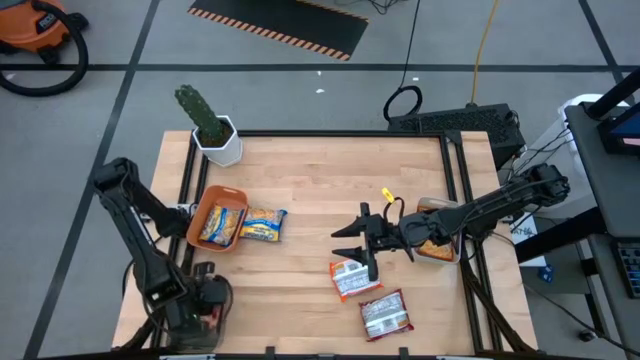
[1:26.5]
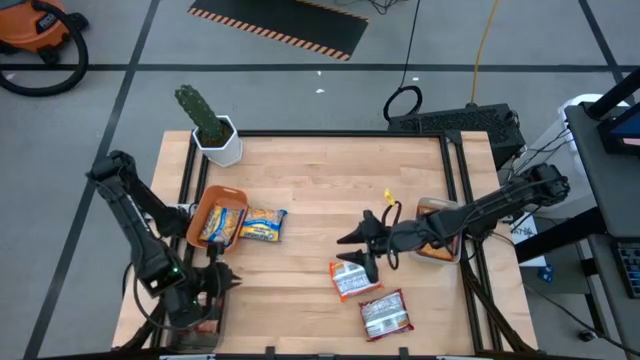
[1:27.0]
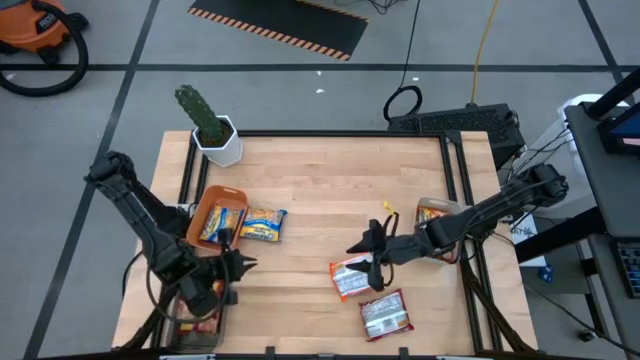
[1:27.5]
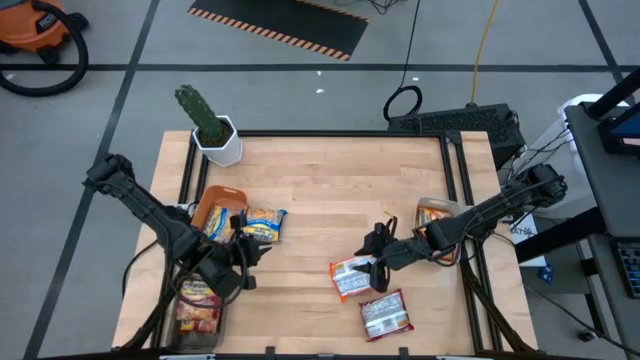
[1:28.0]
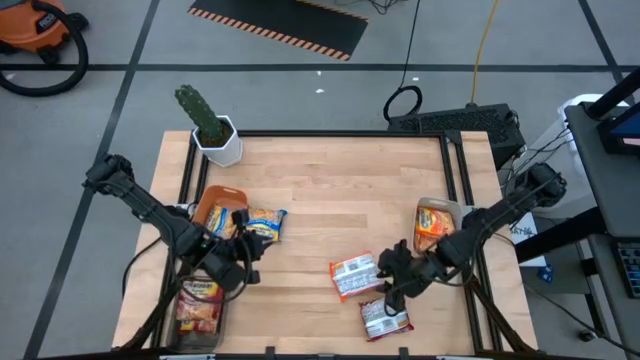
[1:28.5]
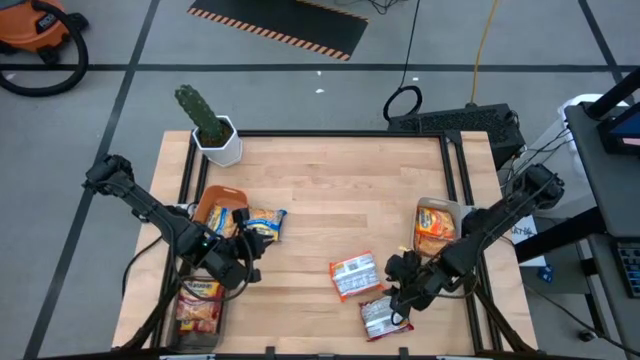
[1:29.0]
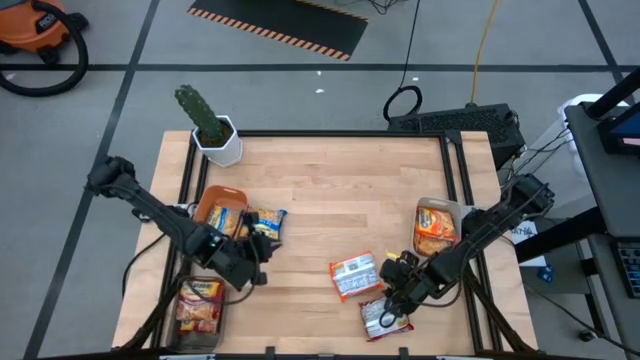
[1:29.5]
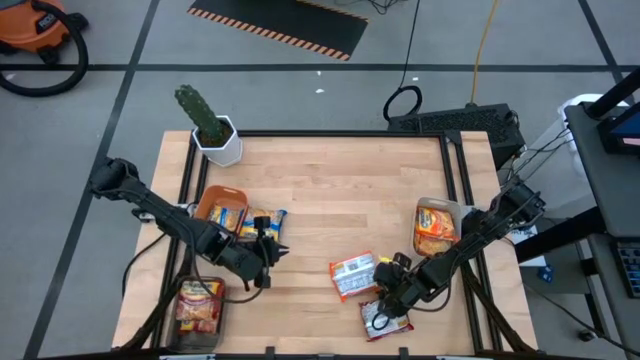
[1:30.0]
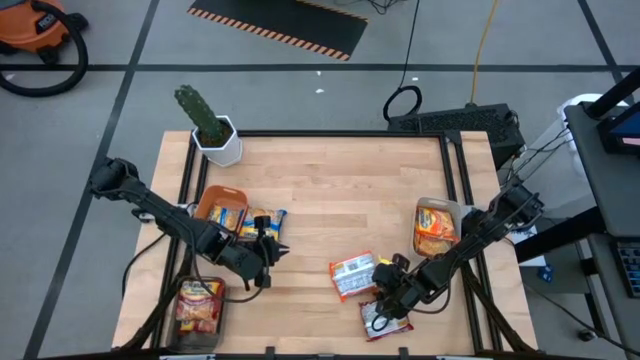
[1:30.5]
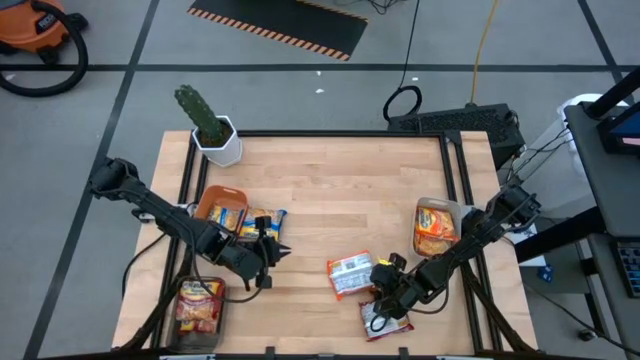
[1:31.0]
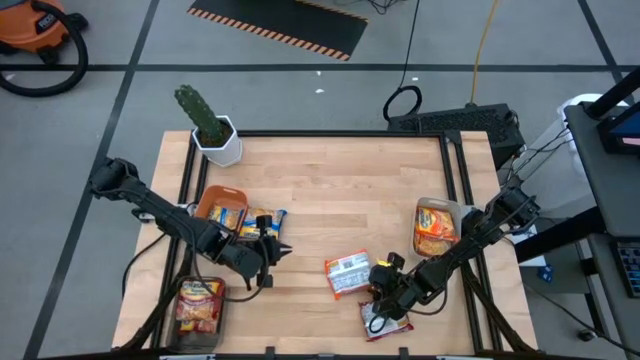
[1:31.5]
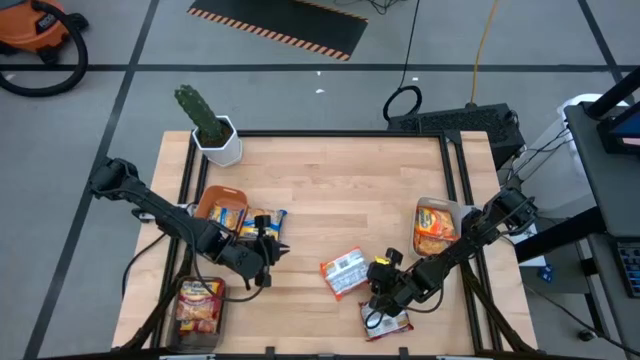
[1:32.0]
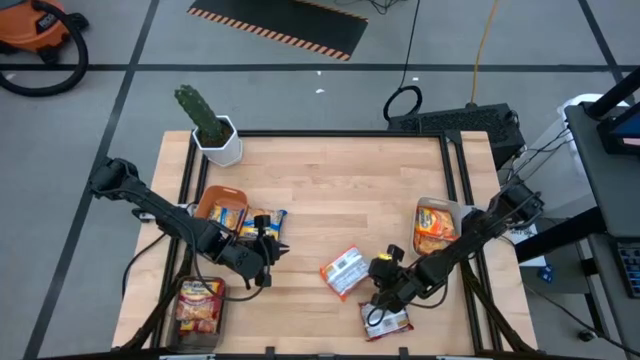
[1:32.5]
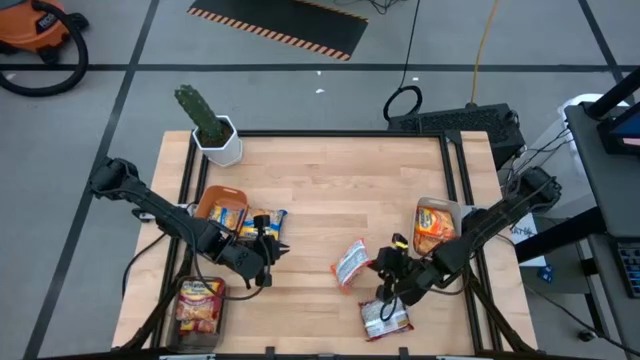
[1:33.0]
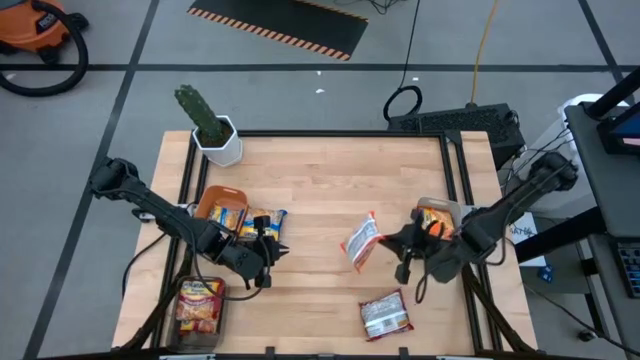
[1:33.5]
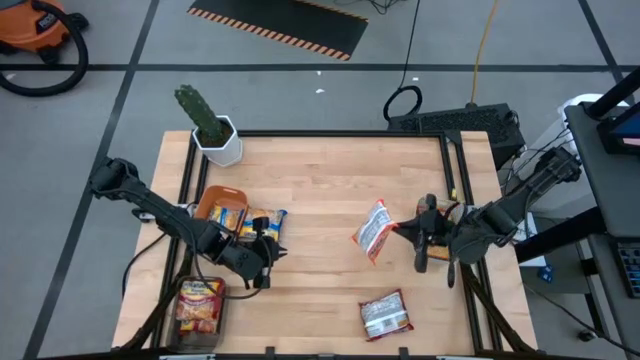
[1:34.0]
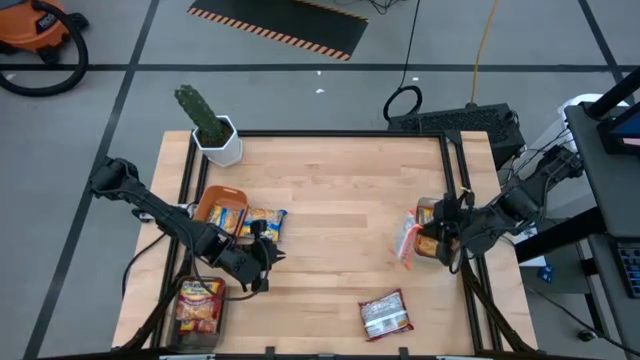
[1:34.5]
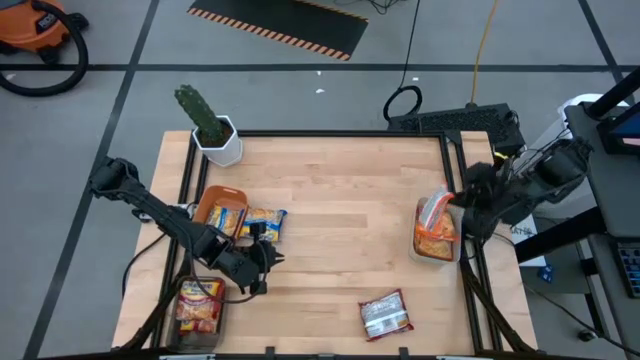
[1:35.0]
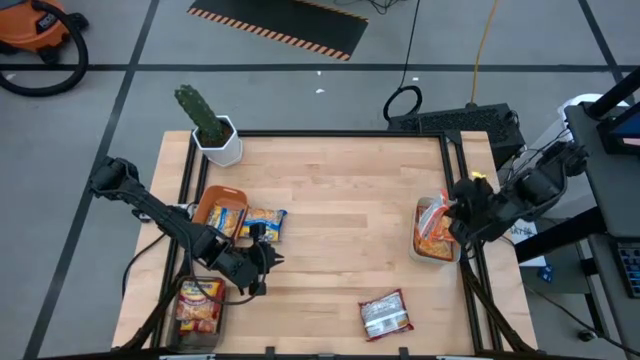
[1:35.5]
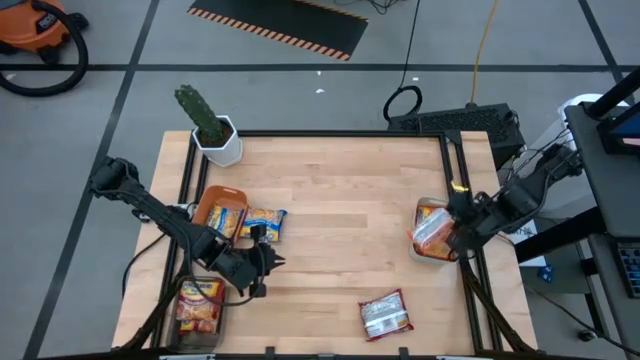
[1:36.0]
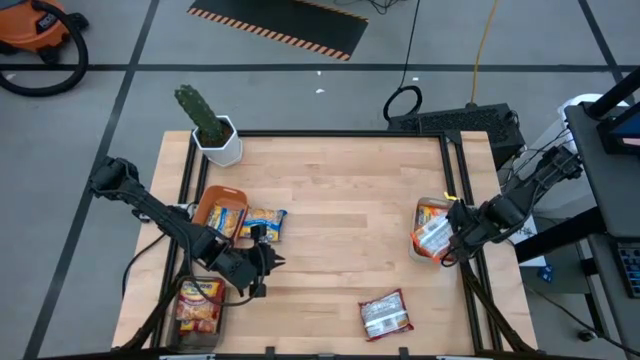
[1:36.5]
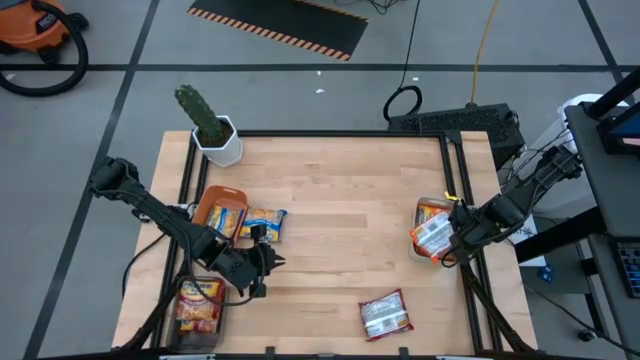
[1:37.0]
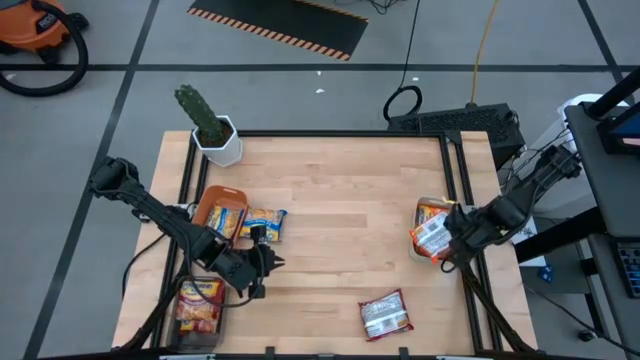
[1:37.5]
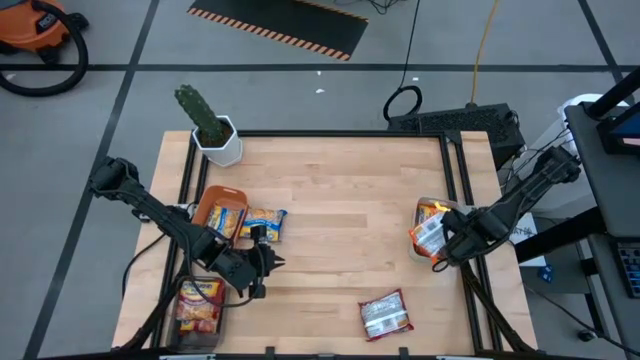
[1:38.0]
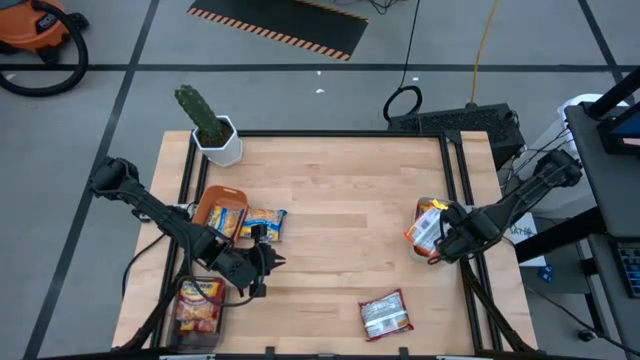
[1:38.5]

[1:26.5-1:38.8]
Task: Sort Maruchan noodles
Put the orange noodle pack into the white bin

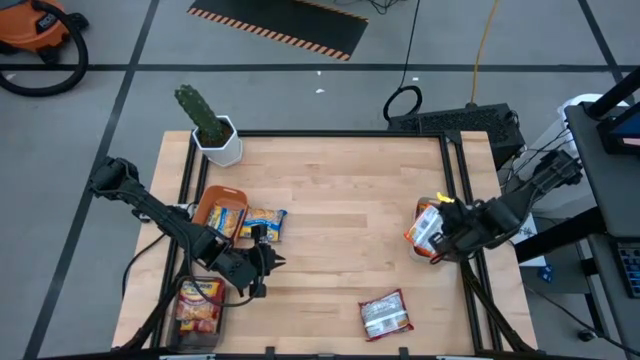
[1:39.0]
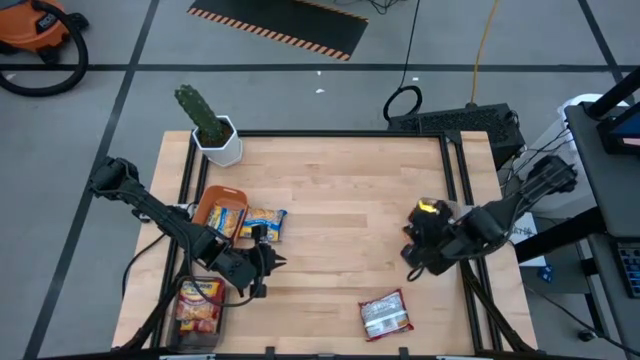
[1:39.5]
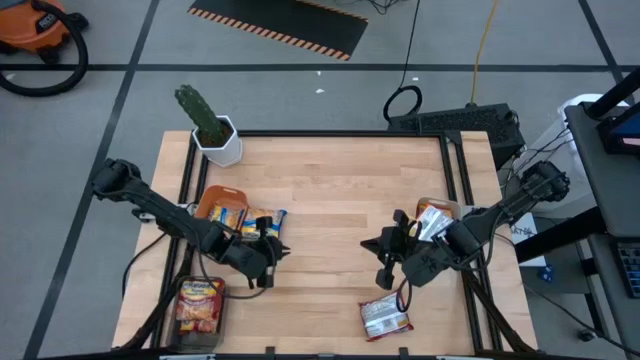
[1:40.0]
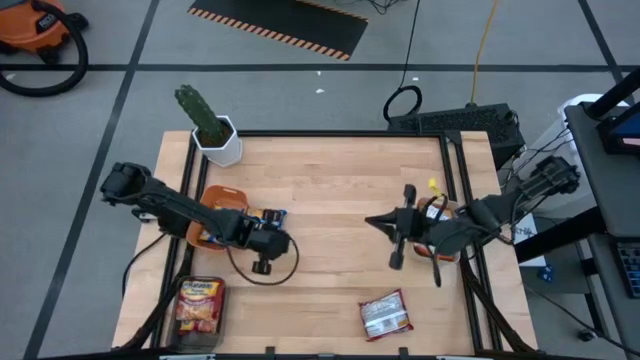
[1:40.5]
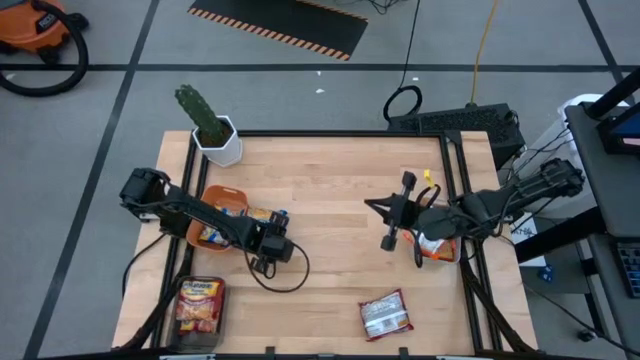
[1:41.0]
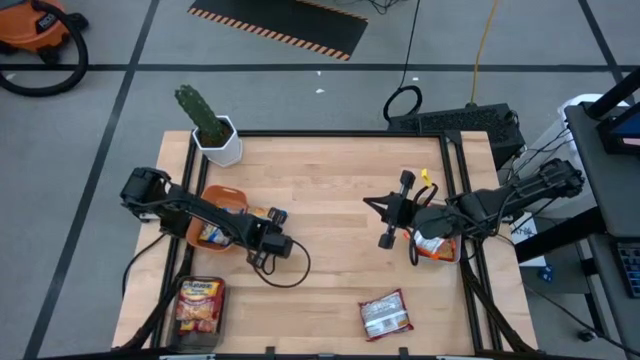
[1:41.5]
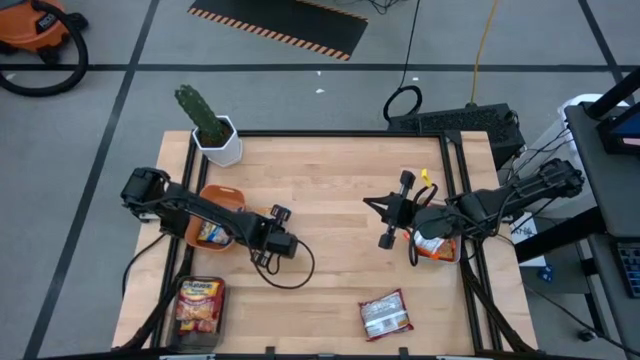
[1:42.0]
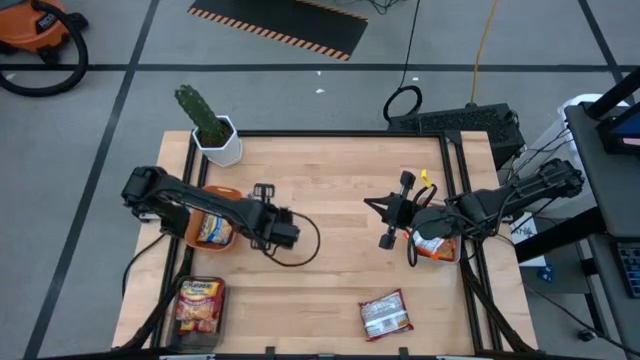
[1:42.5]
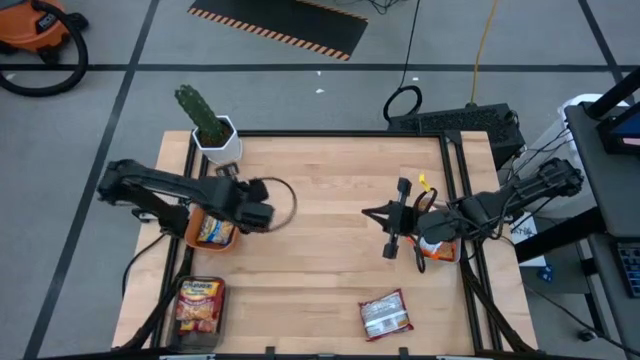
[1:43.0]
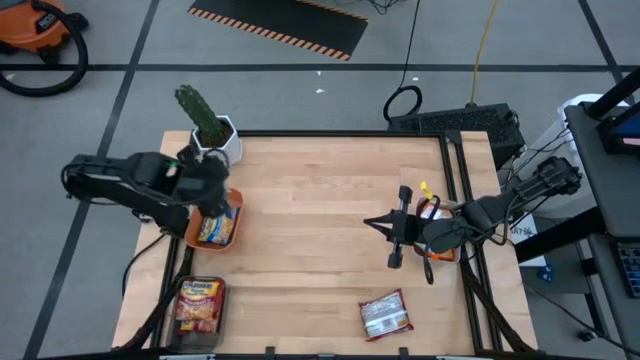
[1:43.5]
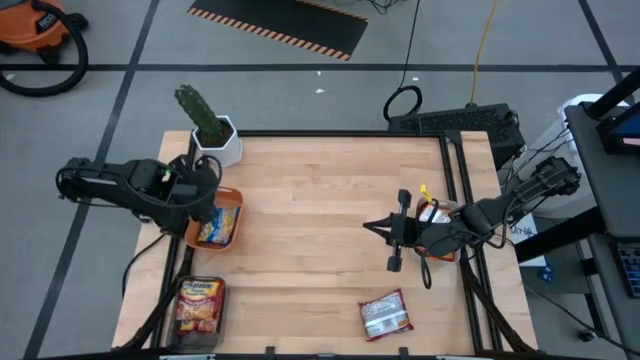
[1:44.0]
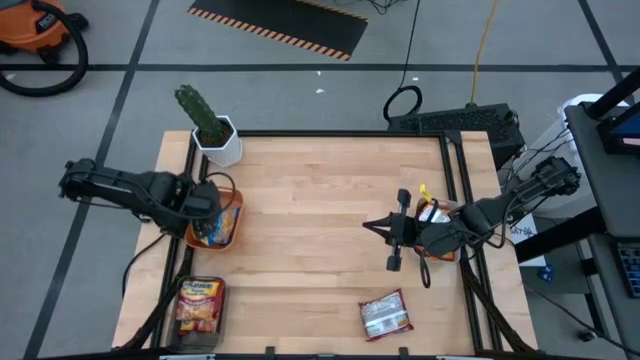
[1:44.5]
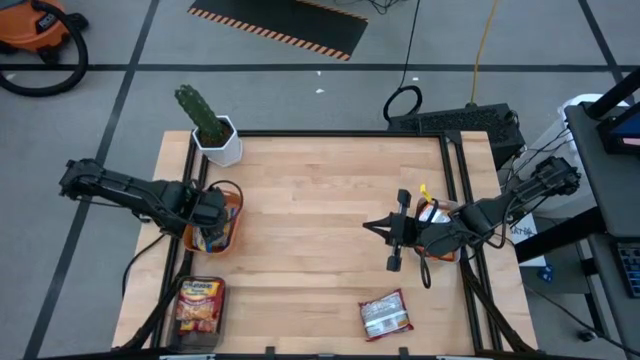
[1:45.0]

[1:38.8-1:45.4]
Put the blue noodle pack into the orange bin

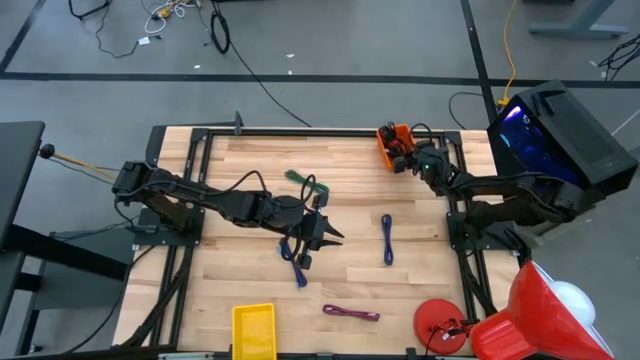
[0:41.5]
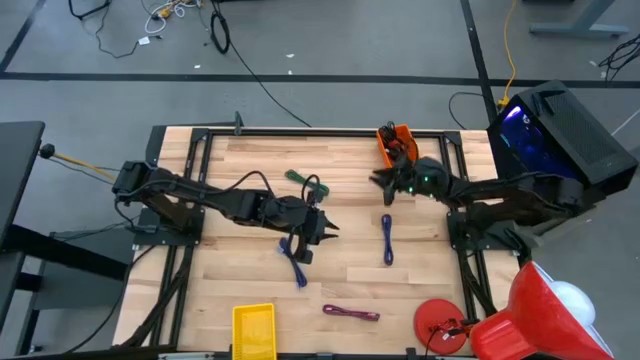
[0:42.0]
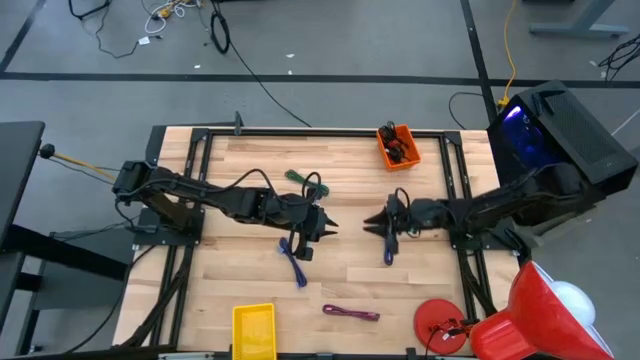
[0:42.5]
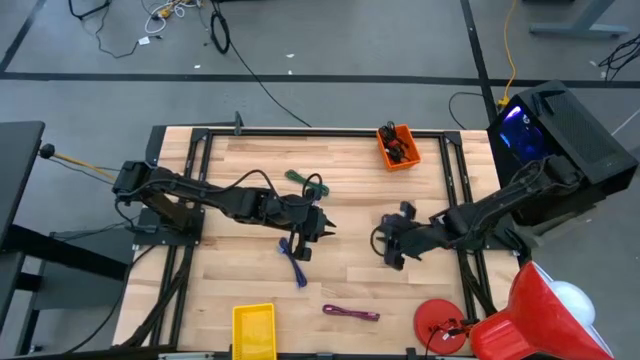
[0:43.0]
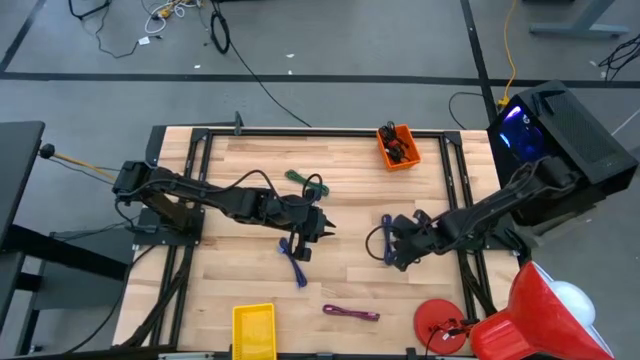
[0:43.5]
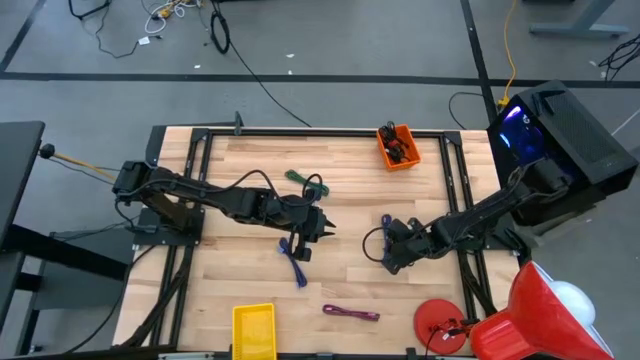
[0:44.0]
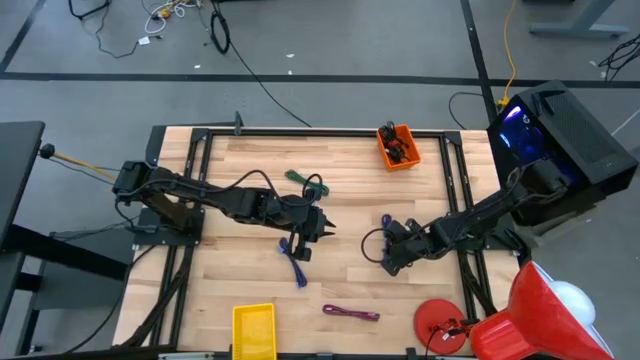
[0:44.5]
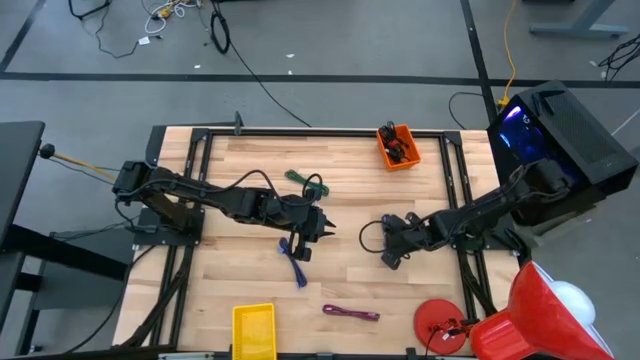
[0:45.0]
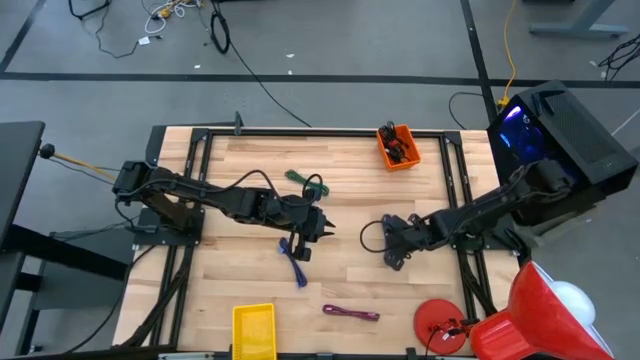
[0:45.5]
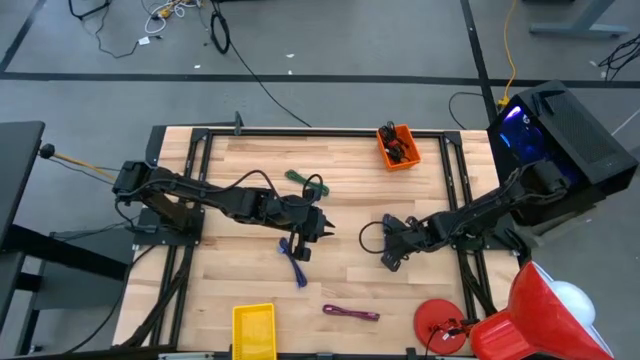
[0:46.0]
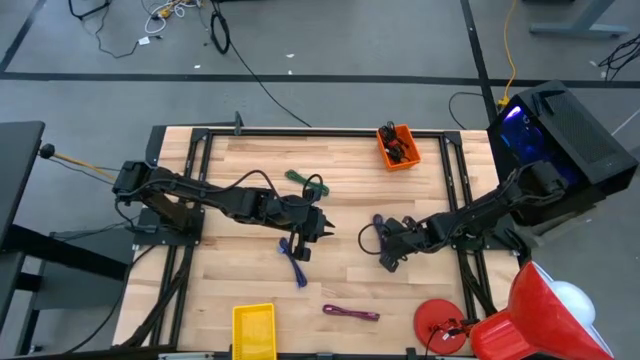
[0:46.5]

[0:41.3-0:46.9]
Task: Pick & Place USB Port
Put the right blue and black charger cable into the yellow bin
